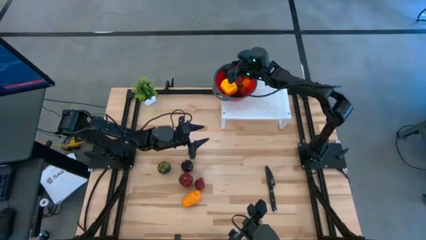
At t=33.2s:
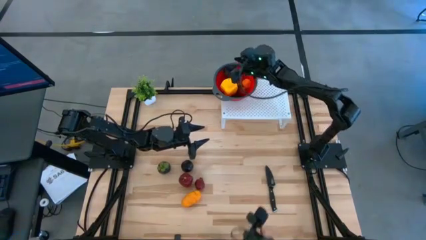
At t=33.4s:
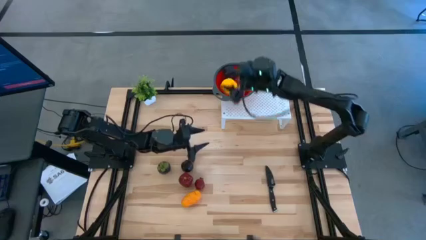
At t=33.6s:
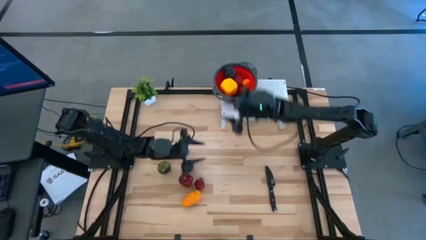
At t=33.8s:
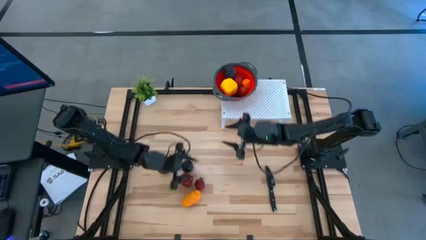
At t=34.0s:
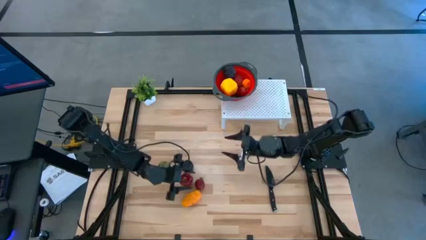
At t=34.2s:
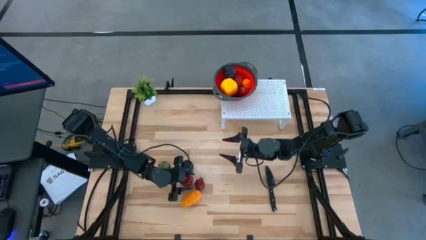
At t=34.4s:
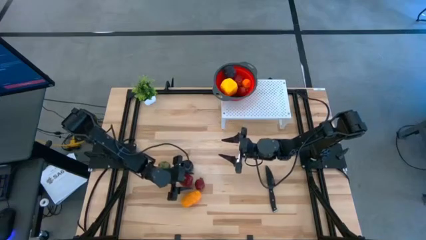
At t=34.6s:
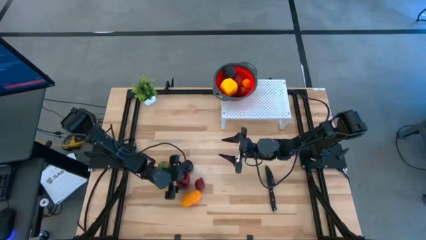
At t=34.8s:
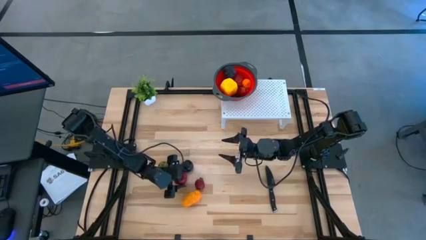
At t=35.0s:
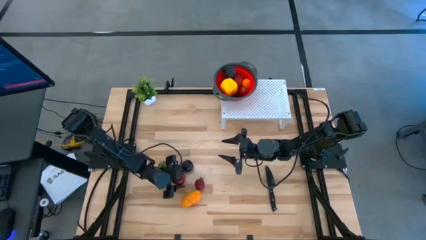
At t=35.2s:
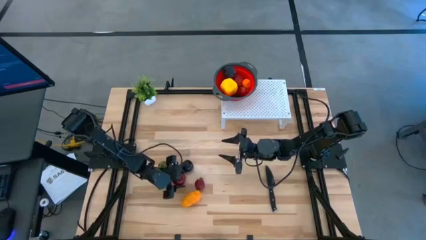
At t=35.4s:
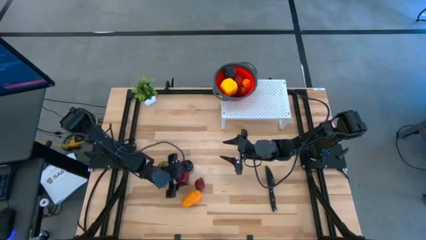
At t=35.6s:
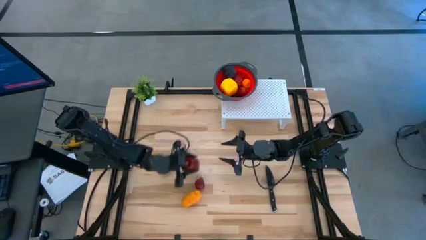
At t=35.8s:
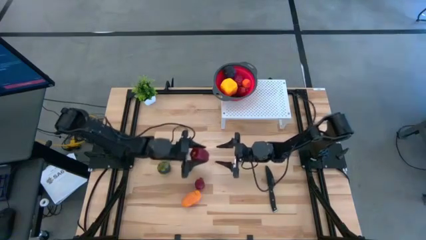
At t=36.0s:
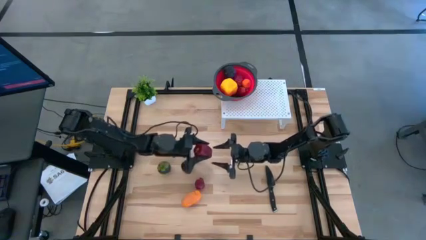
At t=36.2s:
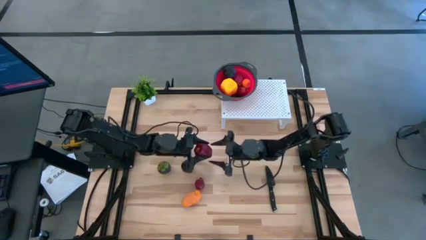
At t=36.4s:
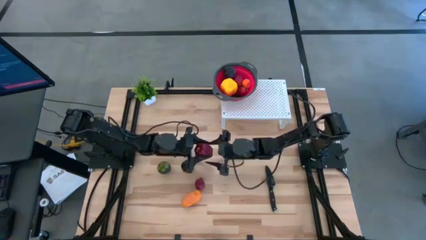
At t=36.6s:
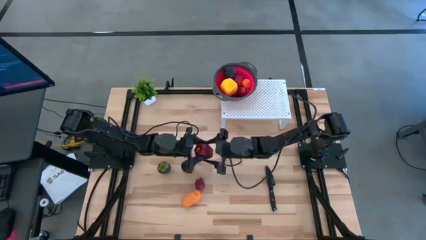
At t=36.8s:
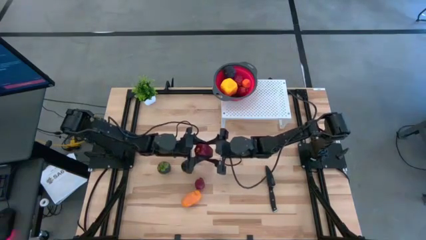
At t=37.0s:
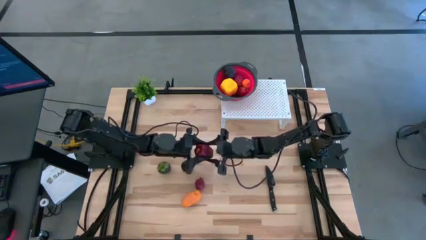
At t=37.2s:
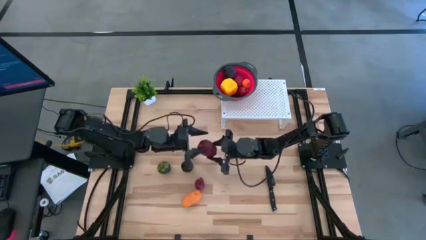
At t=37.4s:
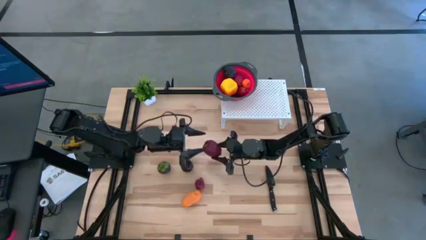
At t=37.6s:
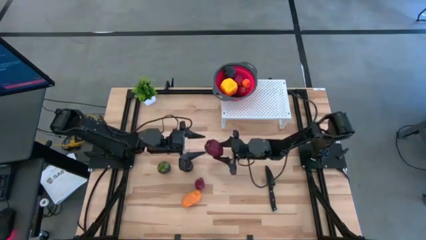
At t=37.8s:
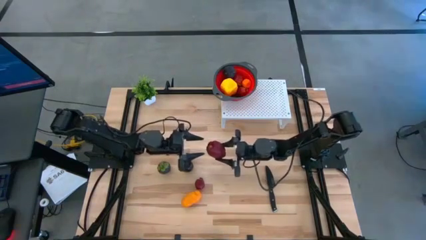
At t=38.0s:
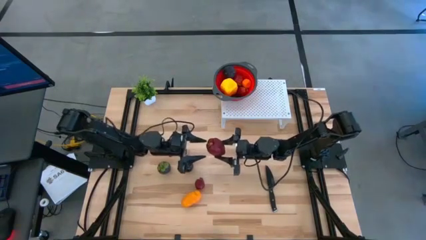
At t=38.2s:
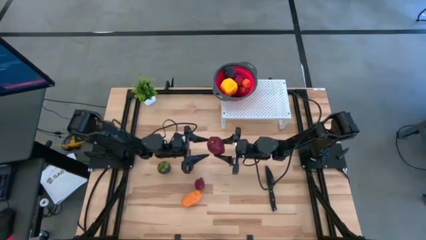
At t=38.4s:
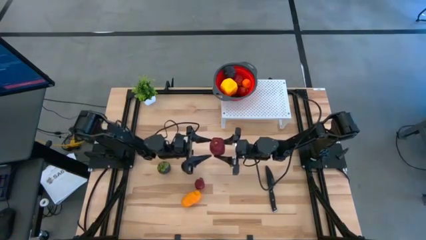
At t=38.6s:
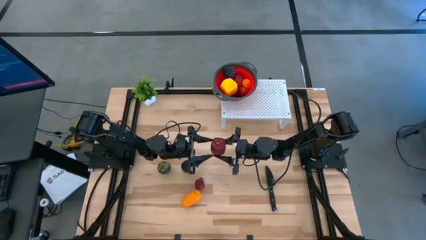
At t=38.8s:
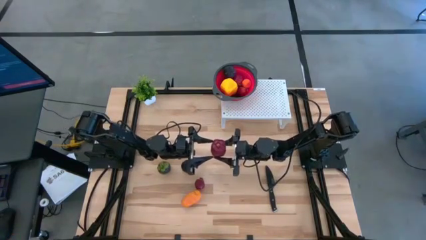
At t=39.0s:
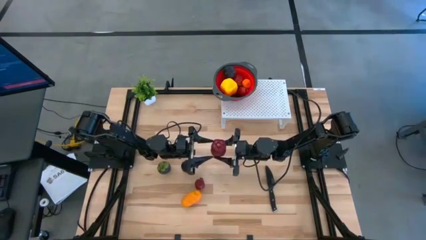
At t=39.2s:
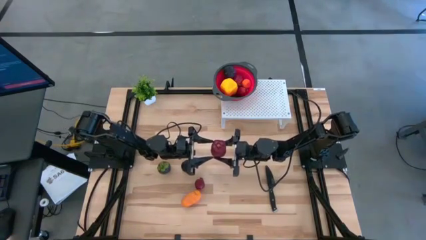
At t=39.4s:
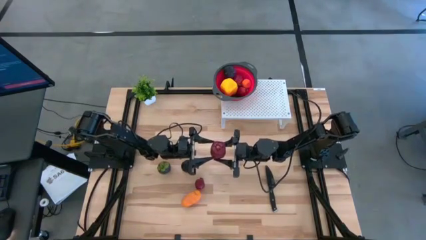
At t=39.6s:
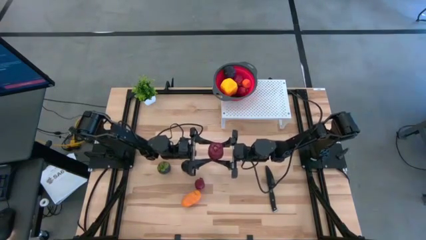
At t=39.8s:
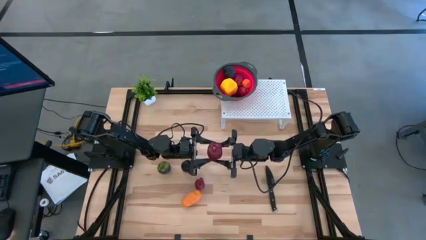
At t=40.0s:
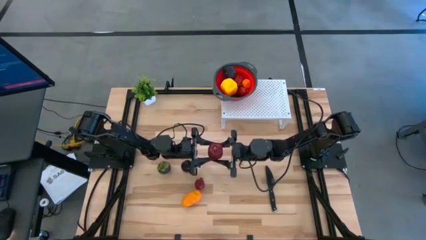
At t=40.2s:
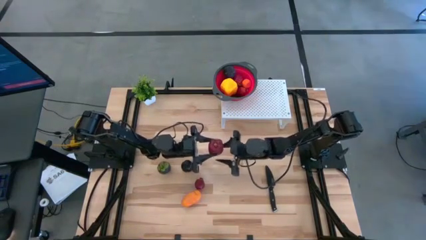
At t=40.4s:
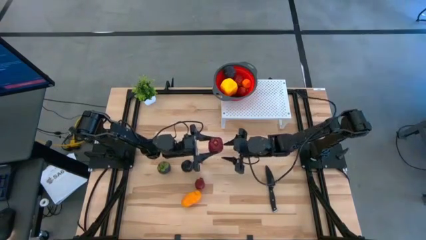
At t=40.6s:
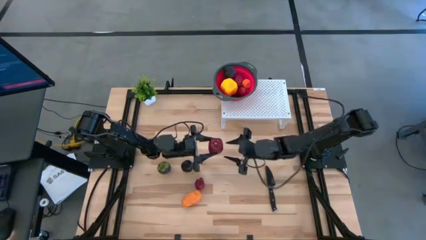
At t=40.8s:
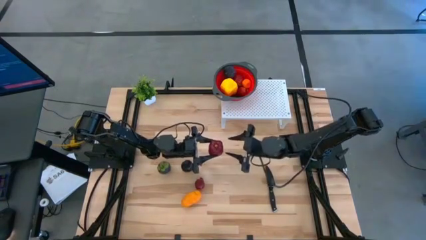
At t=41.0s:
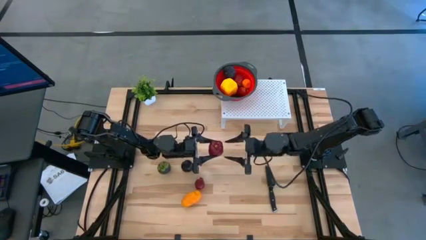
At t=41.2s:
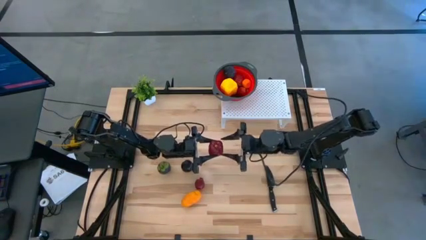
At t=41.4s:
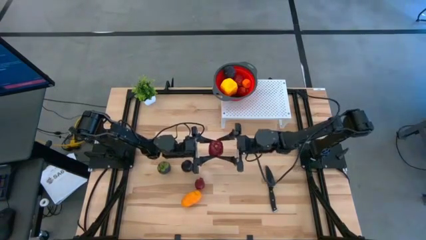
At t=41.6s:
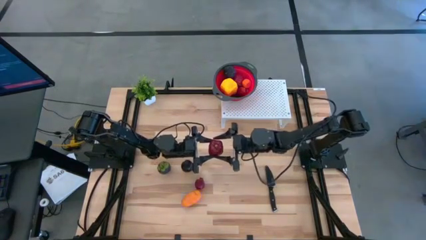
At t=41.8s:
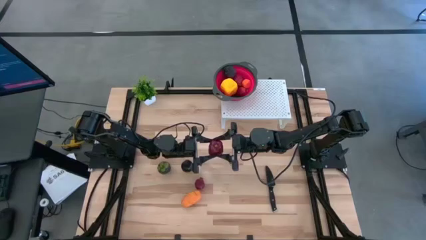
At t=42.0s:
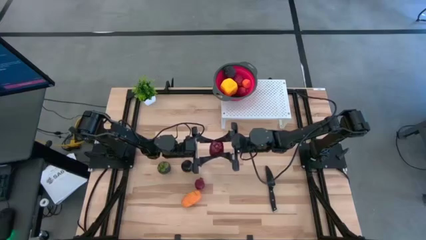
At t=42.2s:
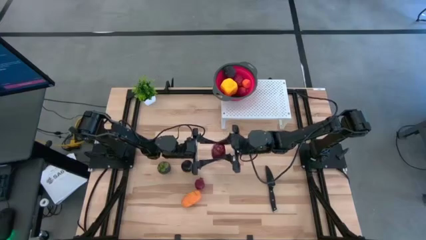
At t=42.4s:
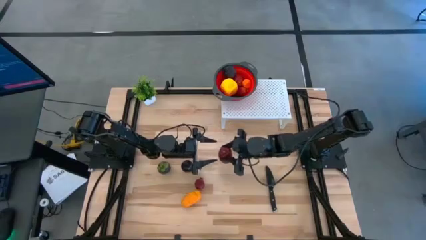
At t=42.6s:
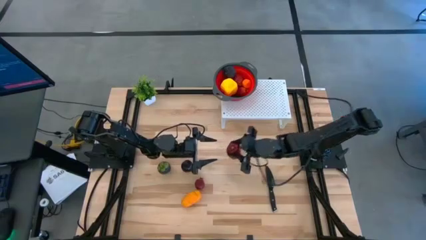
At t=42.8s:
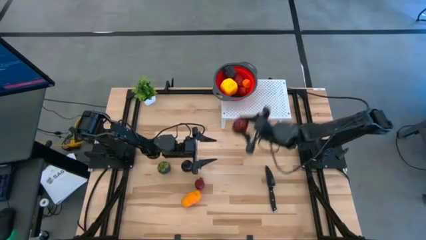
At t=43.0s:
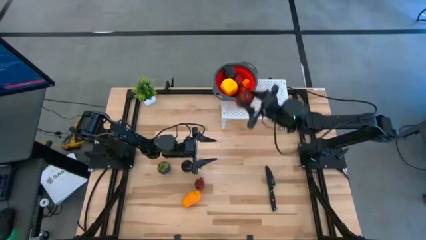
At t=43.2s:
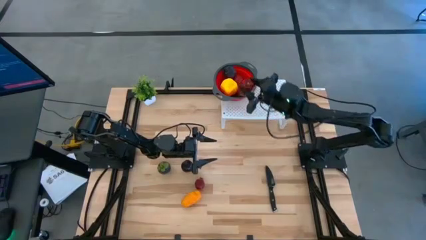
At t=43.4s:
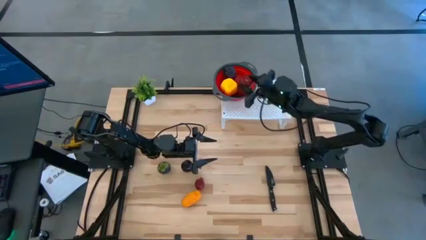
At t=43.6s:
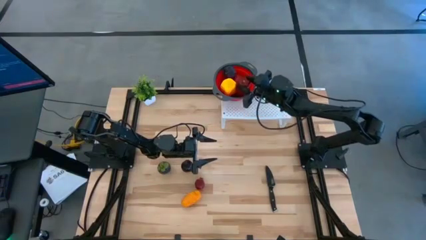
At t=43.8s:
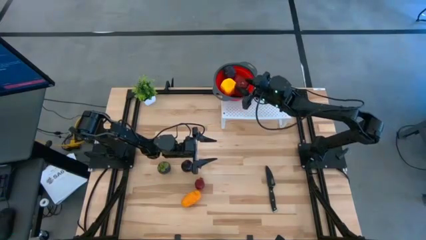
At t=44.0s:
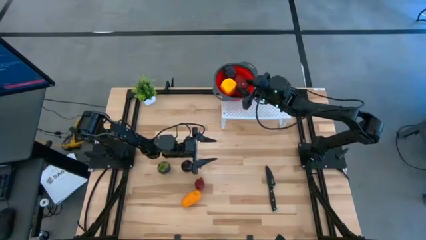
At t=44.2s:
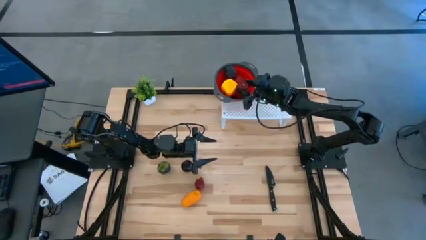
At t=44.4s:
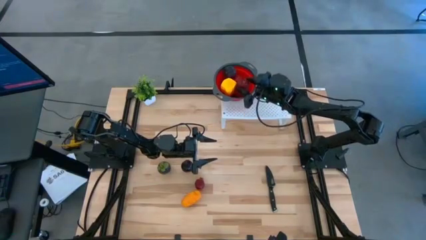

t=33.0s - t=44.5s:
Task: Pick & Place Fruit
Put the apple into the red strainer bowl

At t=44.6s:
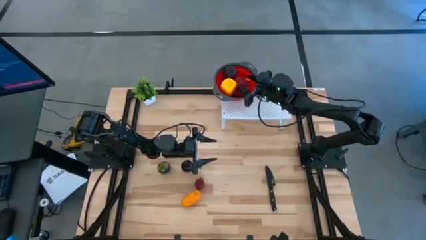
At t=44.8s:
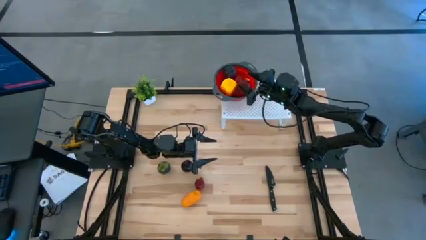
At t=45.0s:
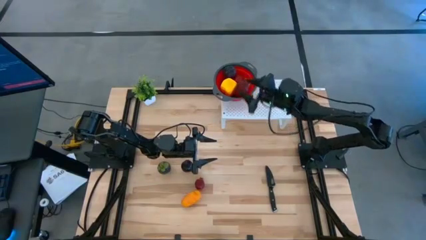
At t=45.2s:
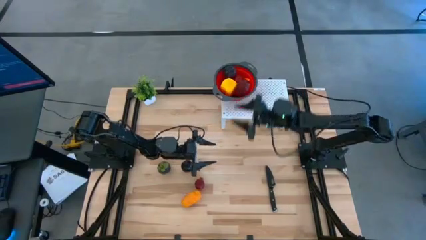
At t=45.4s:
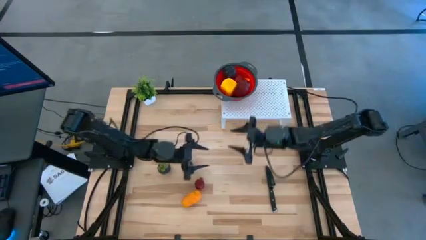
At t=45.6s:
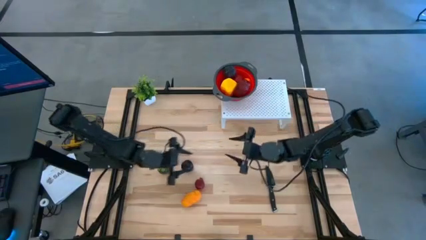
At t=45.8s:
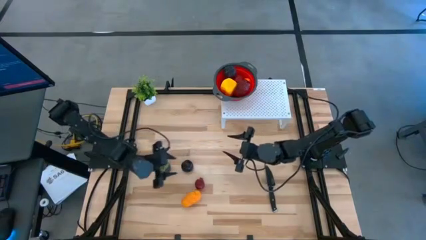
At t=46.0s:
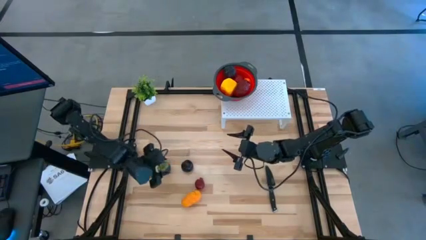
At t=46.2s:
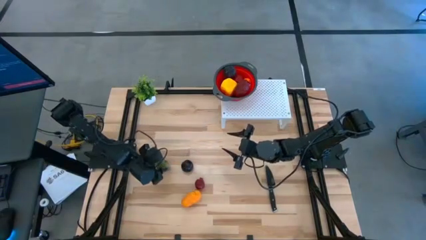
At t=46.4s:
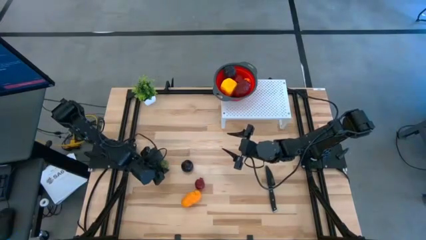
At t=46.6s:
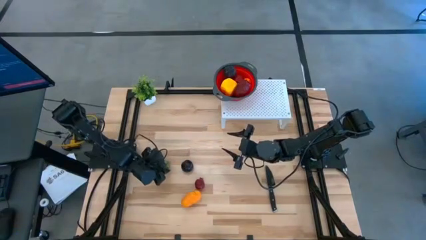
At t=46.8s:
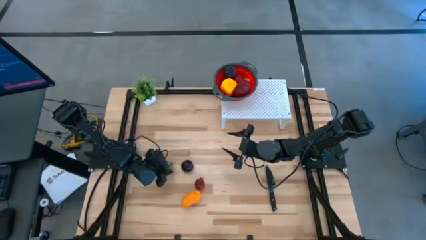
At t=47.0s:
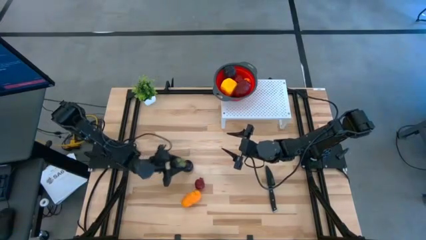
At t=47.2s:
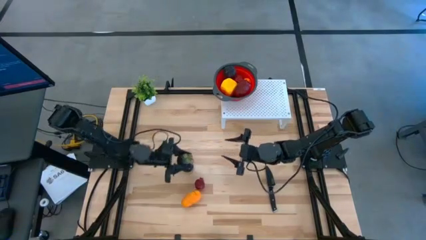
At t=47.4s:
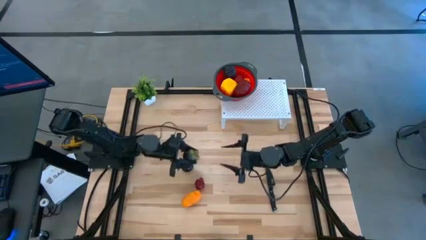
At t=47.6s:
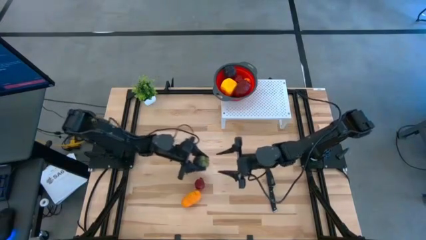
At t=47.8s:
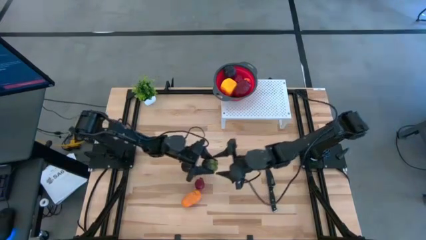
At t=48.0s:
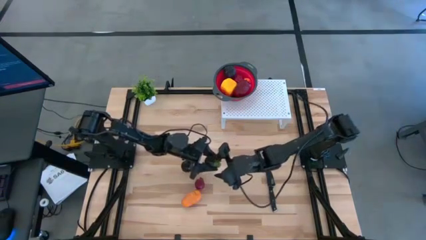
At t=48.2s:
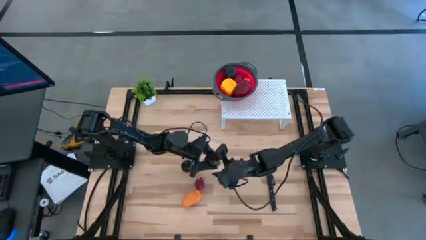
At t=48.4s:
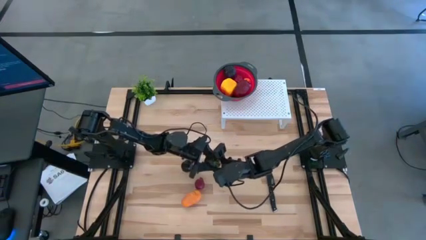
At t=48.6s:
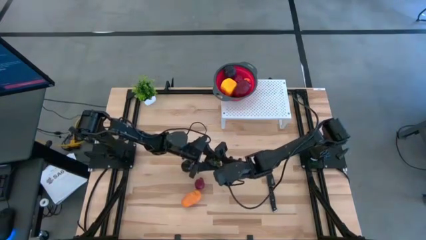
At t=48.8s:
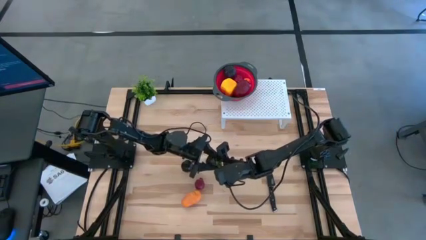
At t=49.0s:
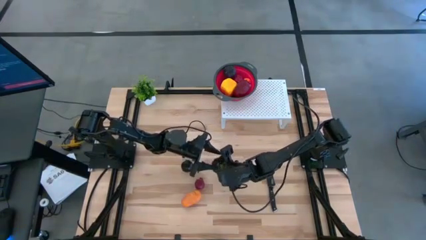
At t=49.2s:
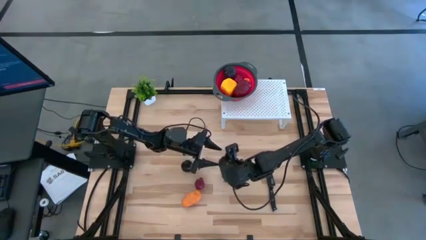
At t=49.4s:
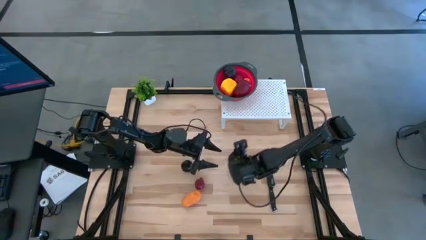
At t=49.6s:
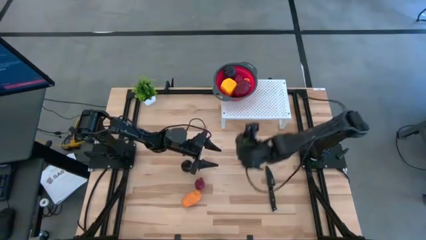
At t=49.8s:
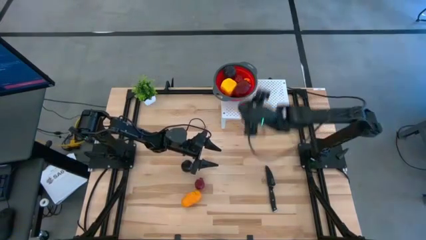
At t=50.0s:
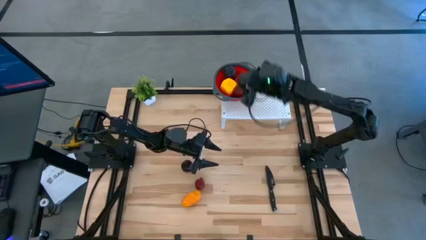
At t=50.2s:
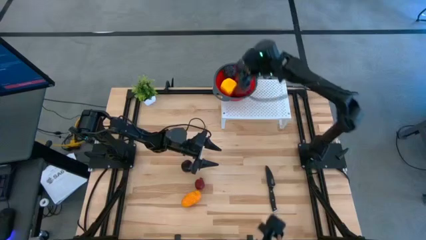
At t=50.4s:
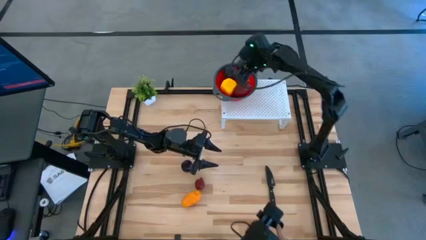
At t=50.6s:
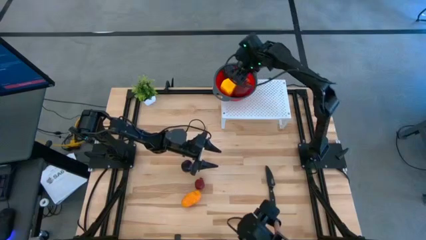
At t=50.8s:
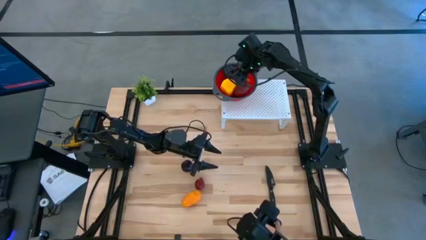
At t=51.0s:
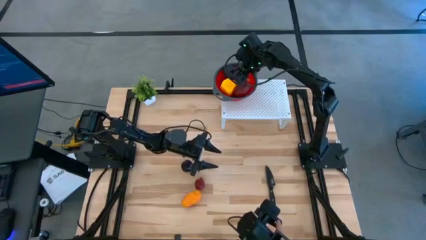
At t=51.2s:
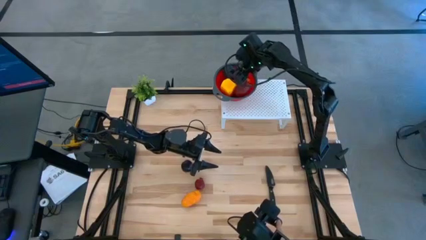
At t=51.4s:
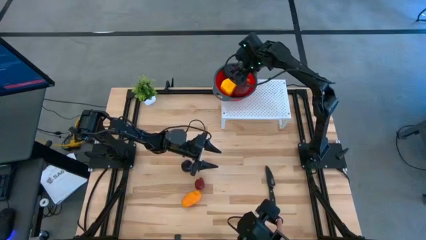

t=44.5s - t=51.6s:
Put the mangosteen into the red strainer bowl
